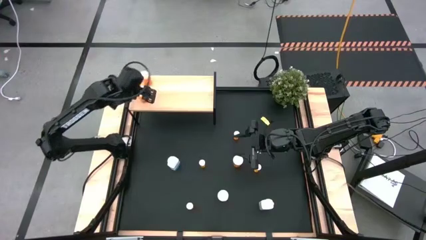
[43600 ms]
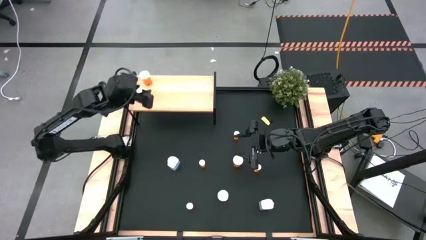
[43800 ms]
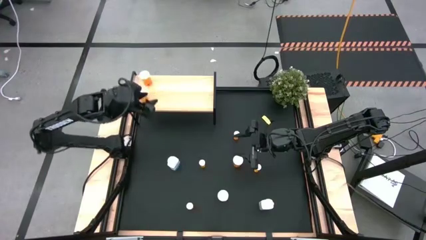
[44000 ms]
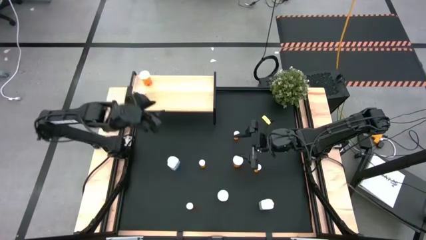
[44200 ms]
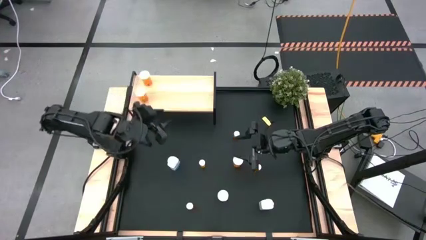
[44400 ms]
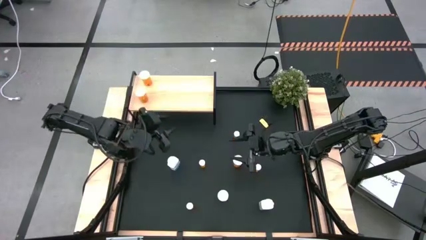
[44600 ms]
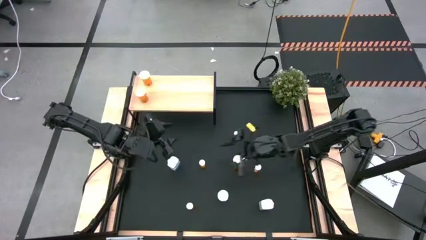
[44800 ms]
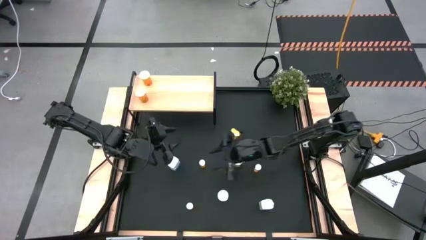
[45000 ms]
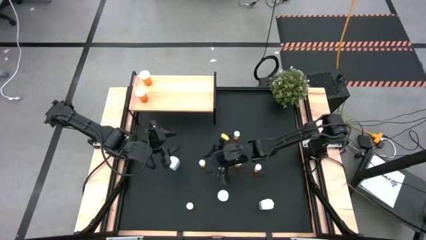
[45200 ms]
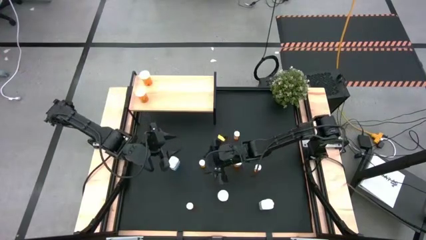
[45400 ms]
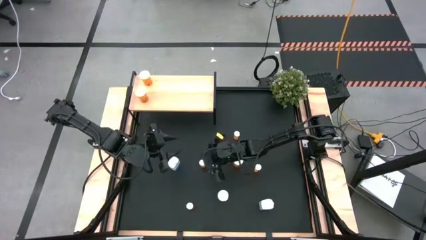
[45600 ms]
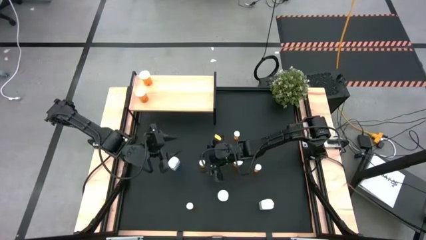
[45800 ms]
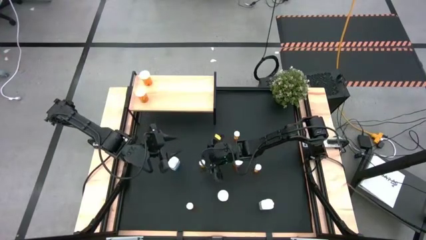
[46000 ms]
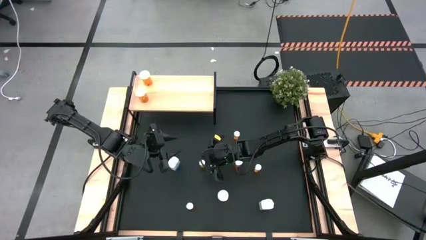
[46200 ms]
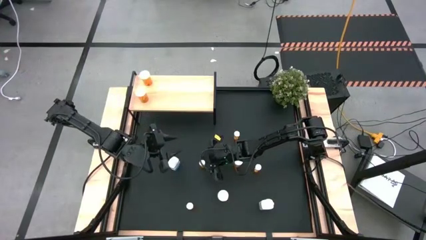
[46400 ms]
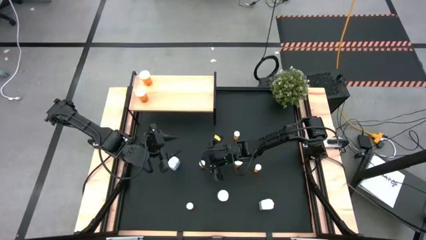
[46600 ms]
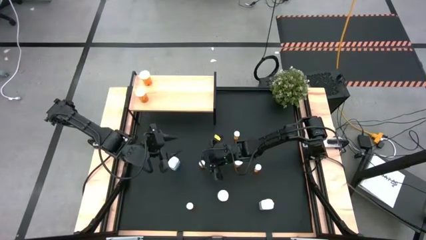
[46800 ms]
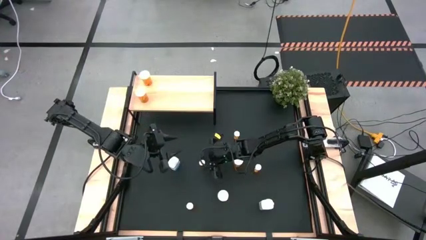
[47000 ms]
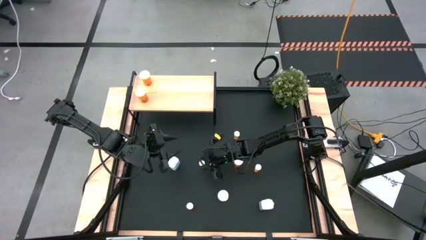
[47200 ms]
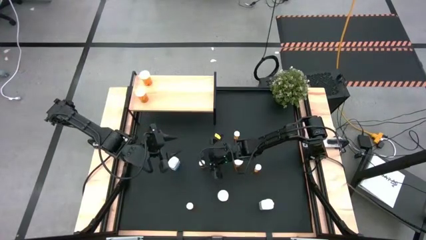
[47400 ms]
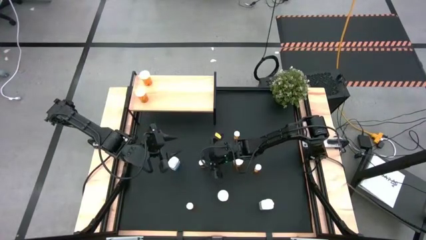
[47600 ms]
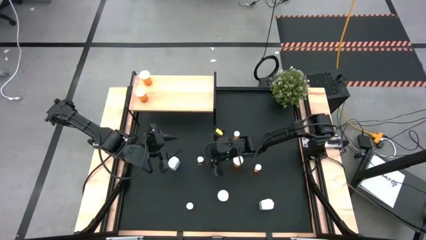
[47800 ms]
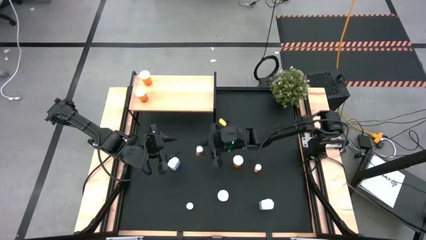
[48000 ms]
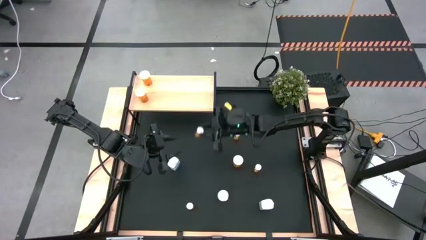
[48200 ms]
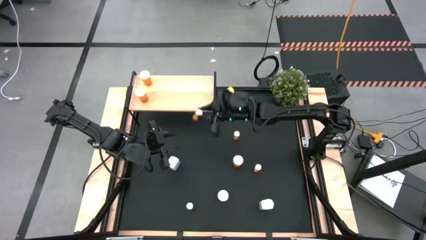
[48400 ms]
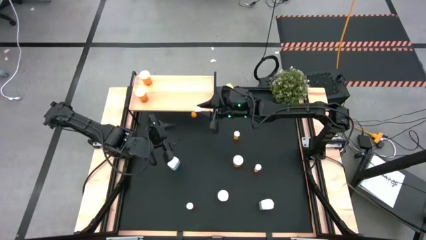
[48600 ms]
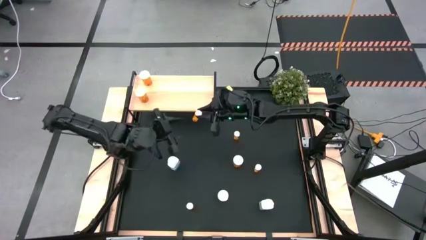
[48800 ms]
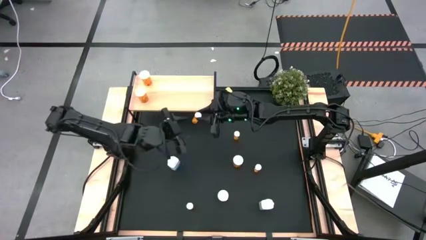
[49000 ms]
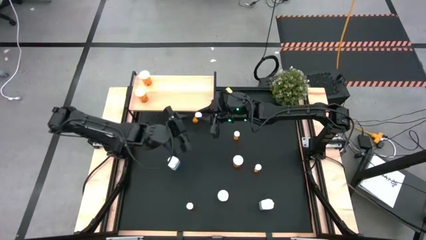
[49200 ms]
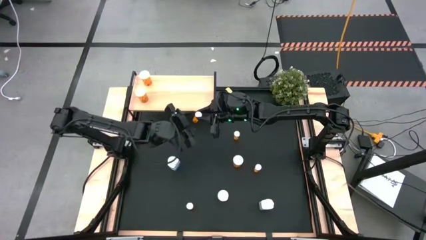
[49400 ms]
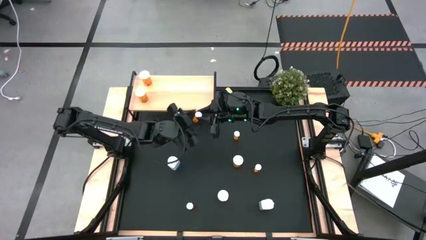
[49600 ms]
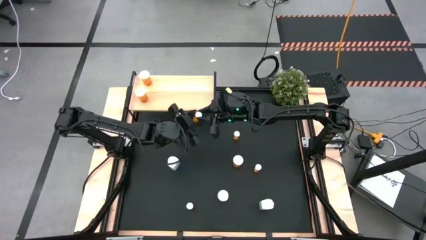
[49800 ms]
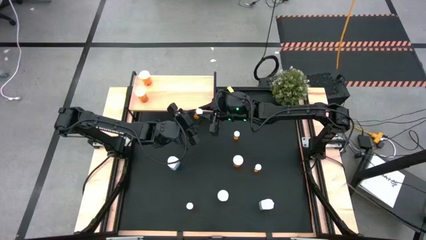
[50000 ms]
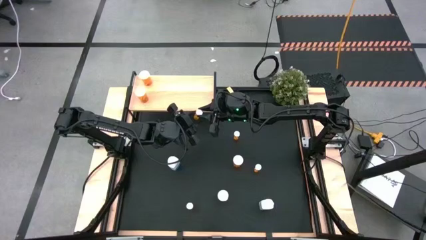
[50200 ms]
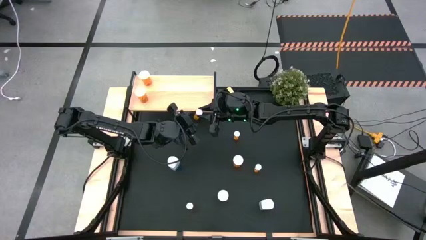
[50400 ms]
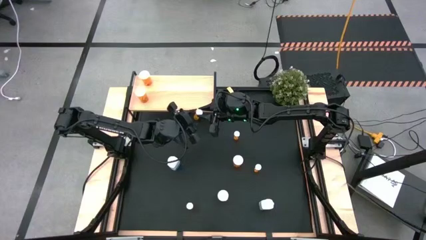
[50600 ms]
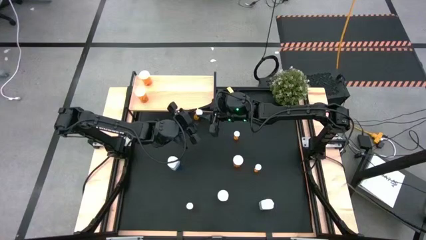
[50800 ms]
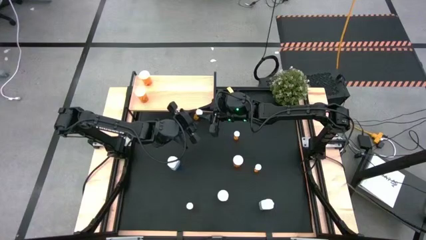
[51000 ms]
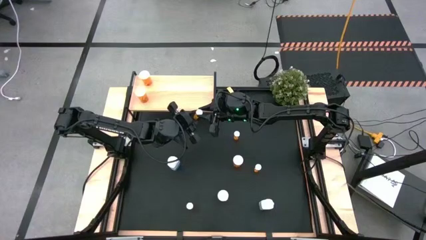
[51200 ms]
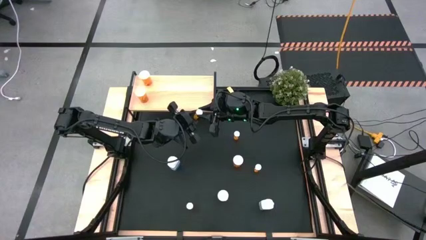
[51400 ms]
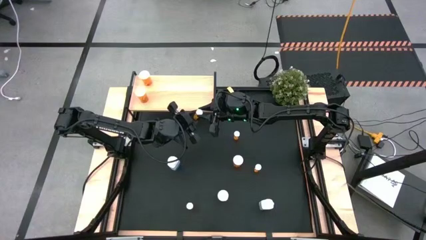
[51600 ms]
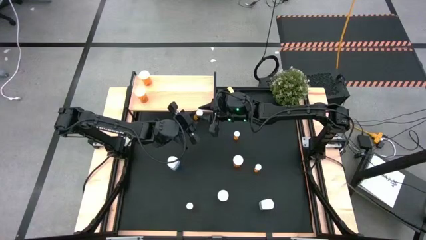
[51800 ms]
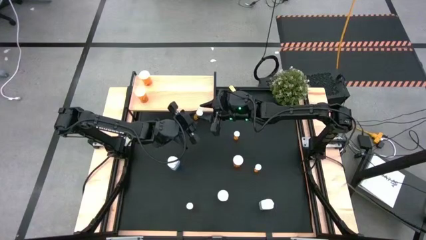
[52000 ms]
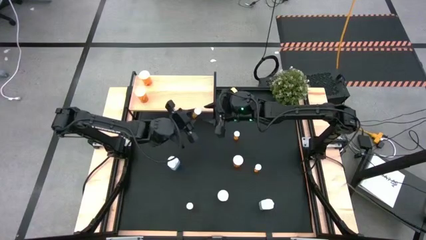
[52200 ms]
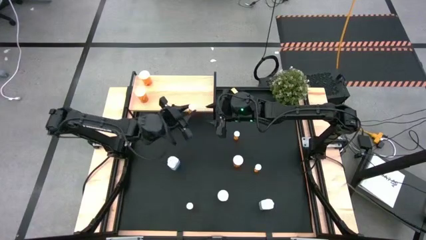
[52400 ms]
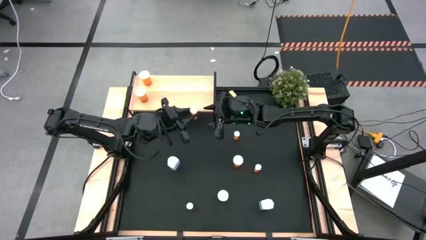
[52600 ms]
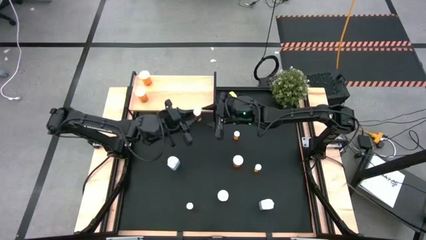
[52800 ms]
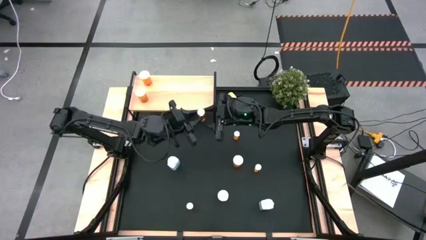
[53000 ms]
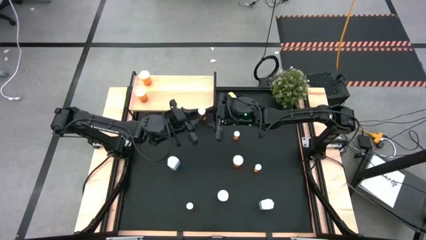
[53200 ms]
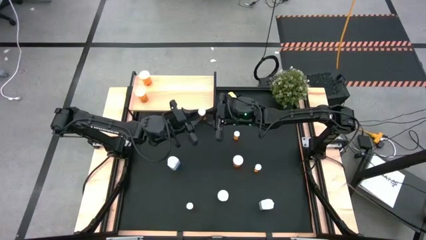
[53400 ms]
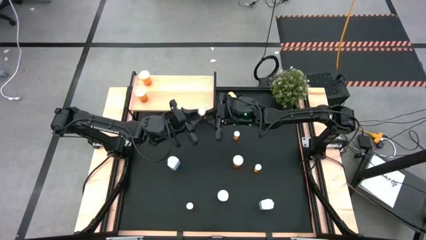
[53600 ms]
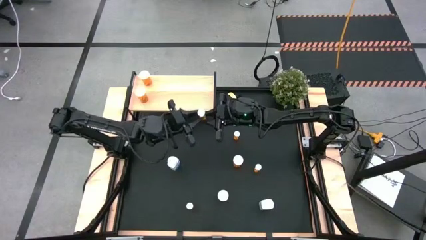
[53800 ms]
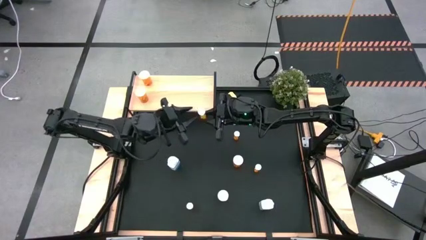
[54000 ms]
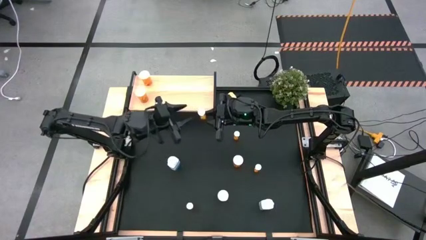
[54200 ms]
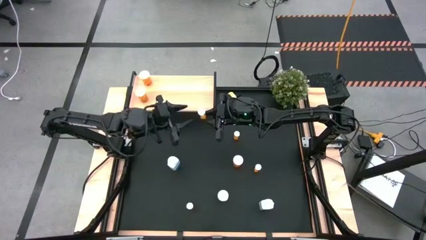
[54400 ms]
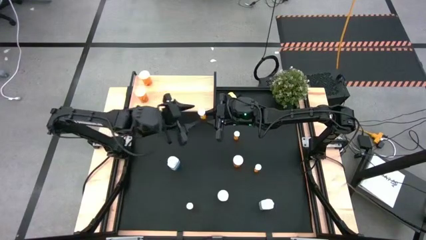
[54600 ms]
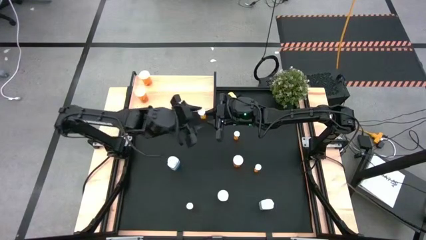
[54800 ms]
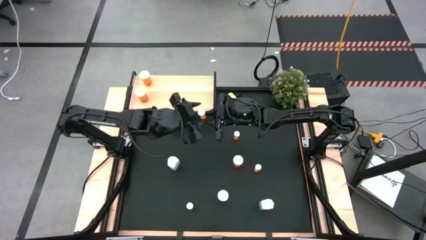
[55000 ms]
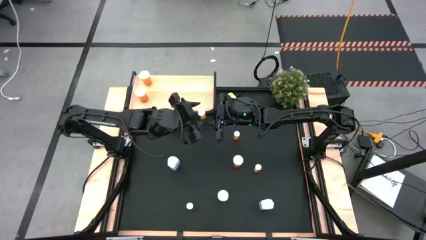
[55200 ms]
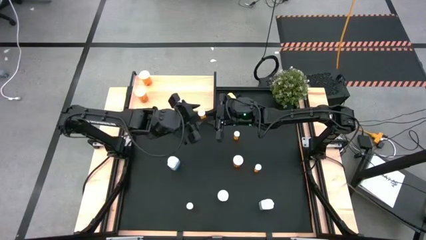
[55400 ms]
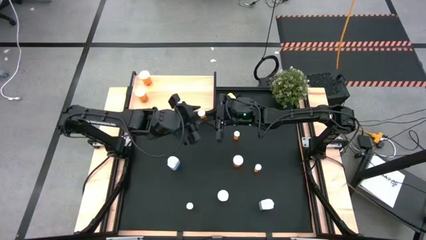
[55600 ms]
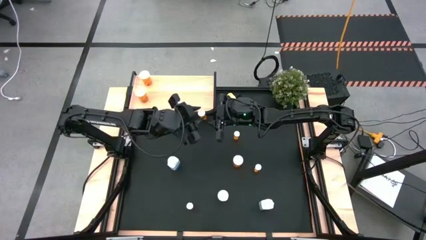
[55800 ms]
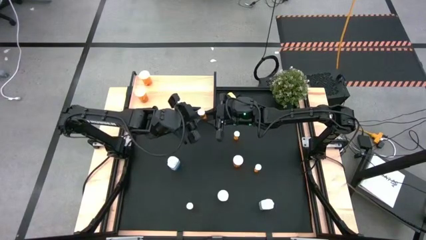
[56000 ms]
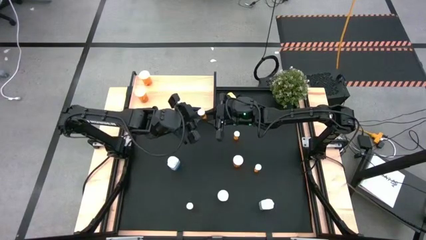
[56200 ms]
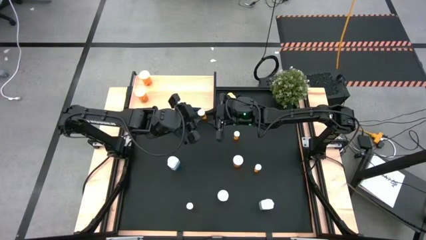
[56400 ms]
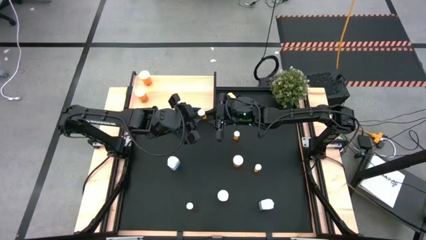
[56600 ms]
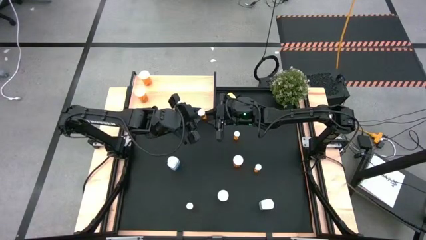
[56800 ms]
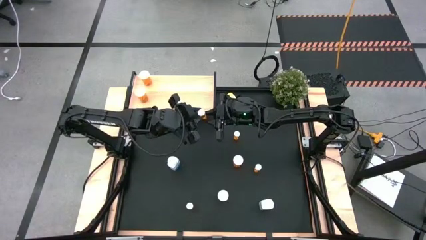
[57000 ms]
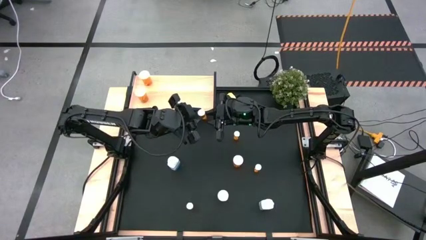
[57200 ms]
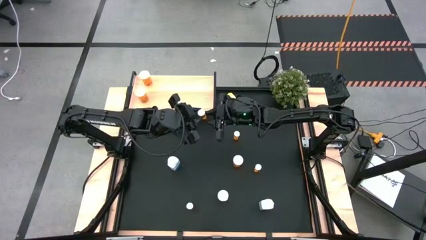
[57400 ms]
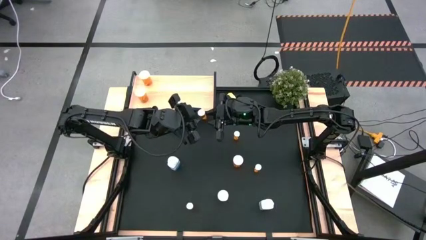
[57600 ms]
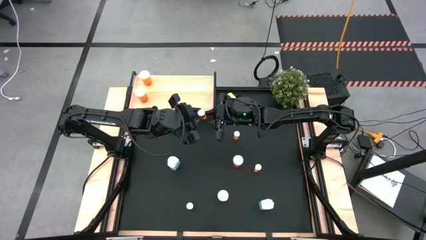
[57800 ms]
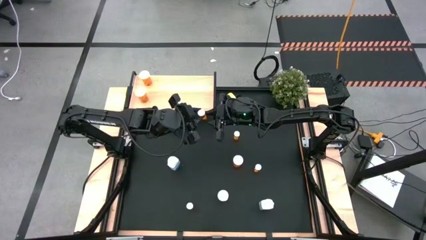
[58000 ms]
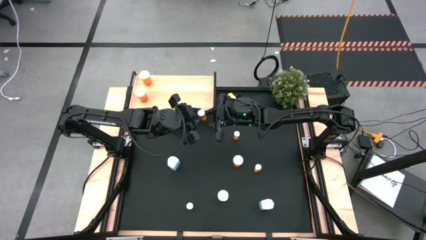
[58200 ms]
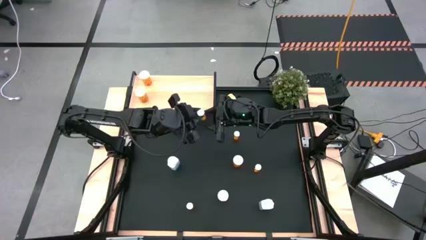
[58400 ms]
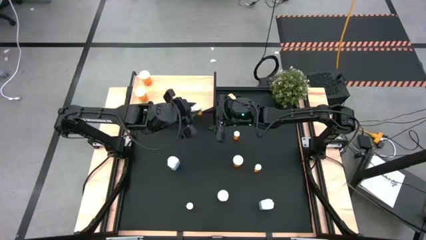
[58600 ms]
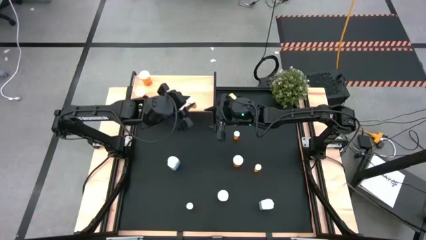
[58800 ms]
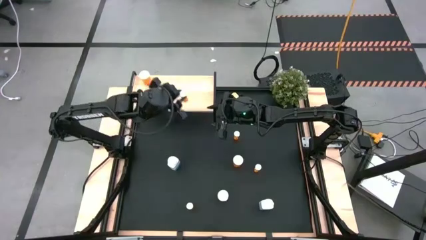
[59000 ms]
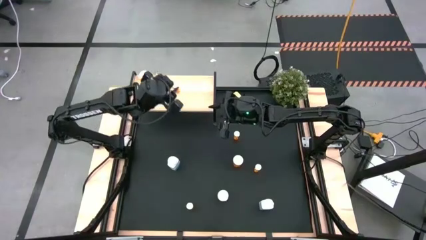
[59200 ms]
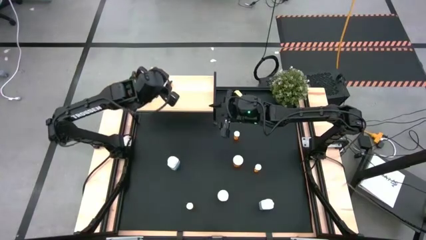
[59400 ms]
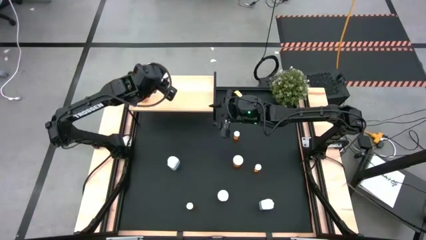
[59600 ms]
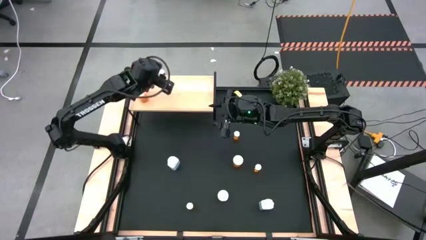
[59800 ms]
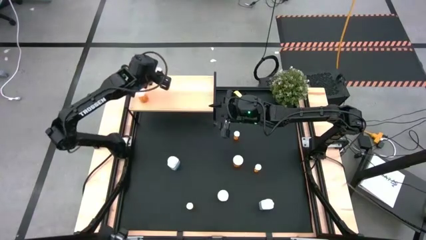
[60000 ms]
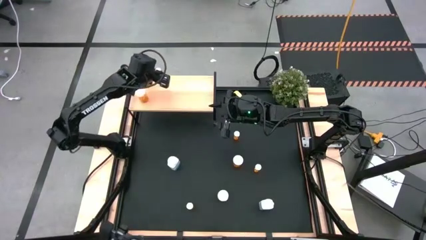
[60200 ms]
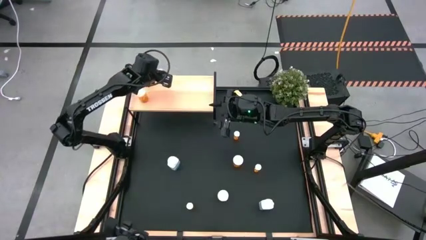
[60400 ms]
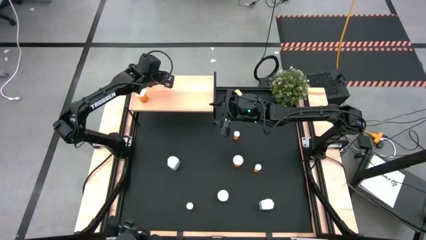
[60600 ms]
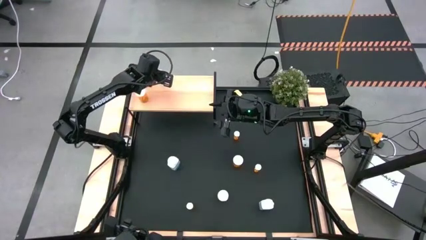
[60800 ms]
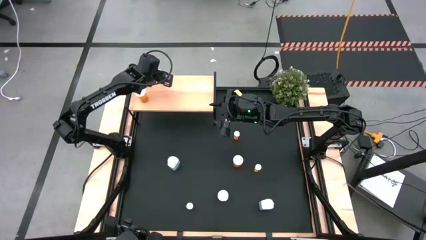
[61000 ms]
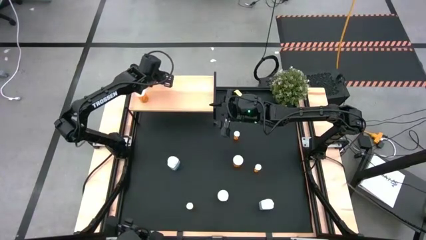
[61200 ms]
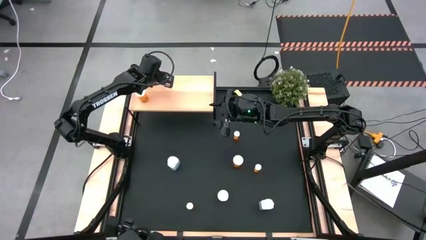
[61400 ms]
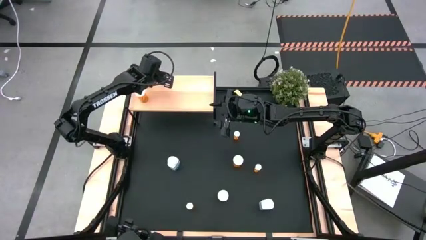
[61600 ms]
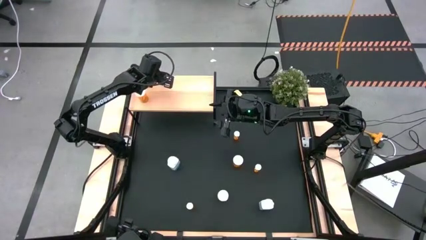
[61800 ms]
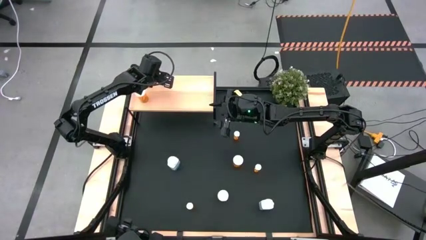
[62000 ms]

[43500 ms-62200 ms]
Task: Pick and place medicine bottles onto shelf by color
Put the small orange pill bottle on the shelf
